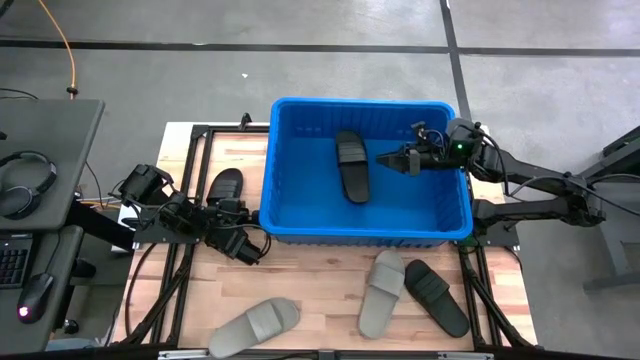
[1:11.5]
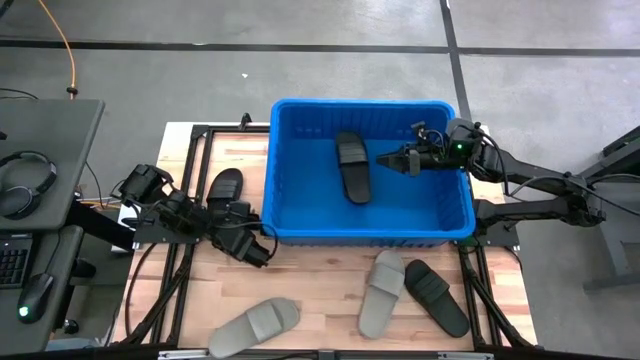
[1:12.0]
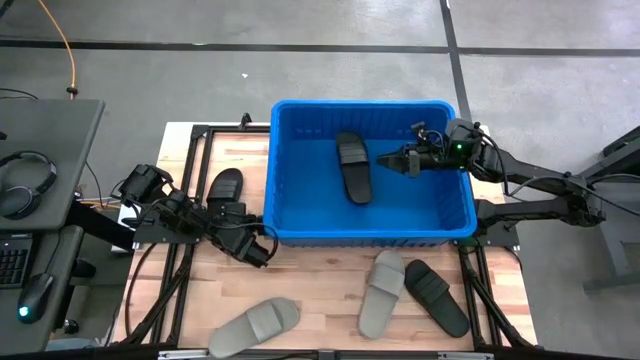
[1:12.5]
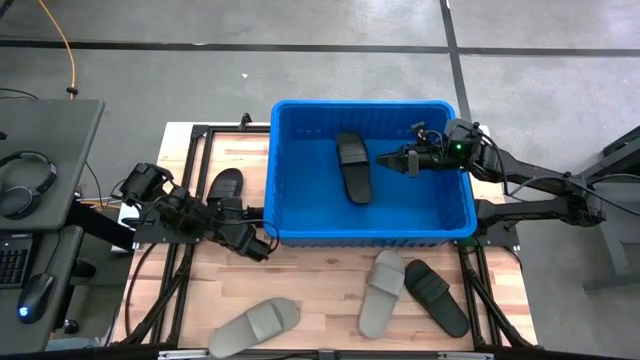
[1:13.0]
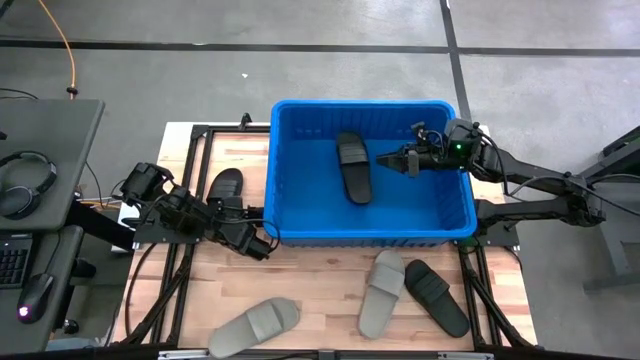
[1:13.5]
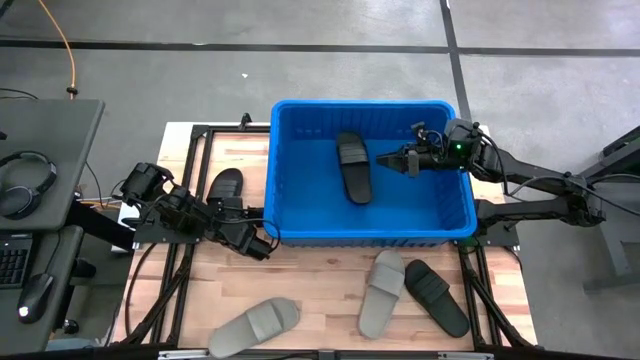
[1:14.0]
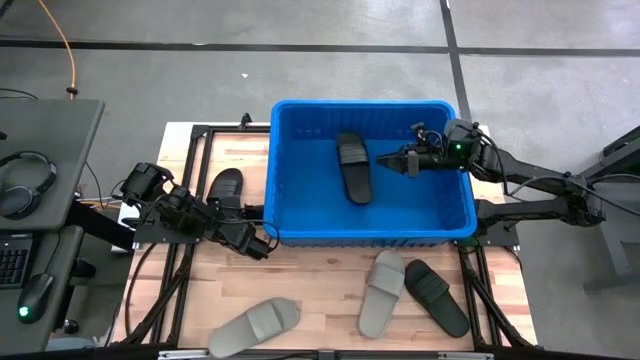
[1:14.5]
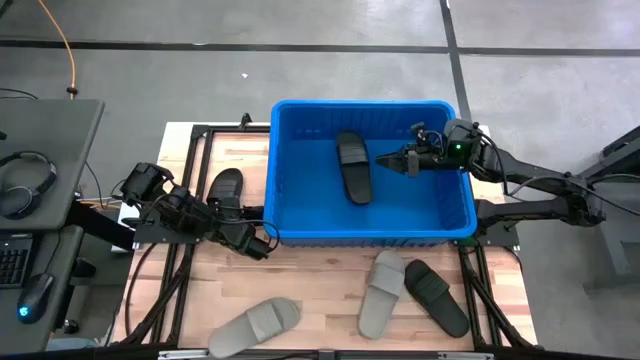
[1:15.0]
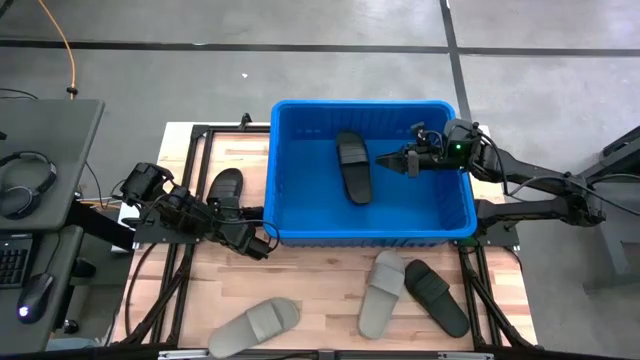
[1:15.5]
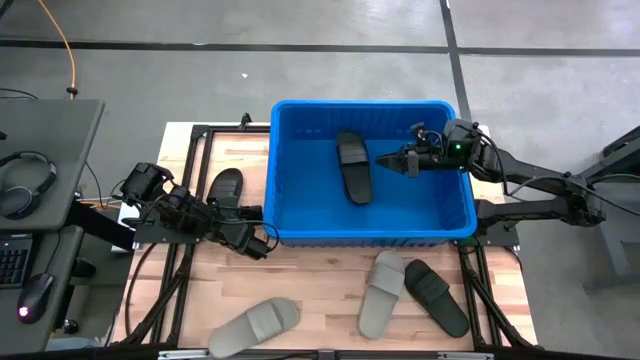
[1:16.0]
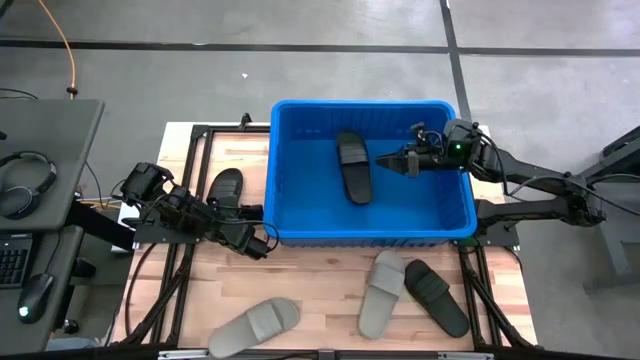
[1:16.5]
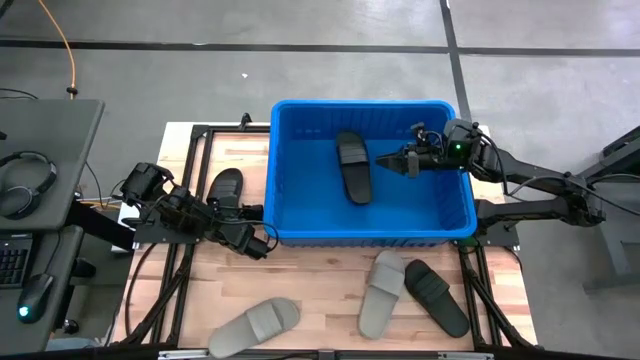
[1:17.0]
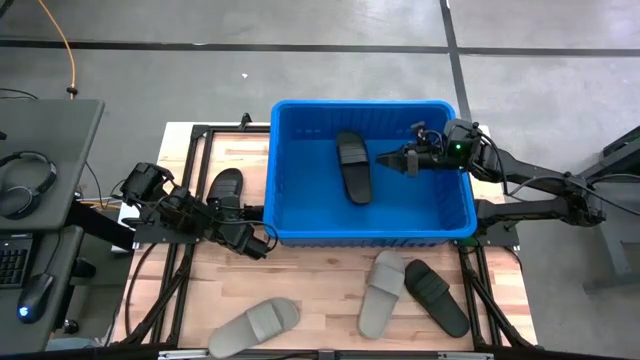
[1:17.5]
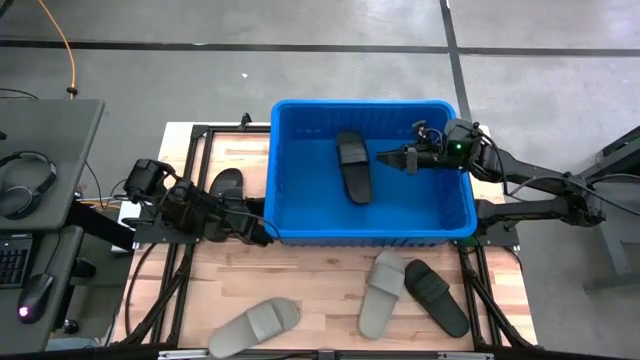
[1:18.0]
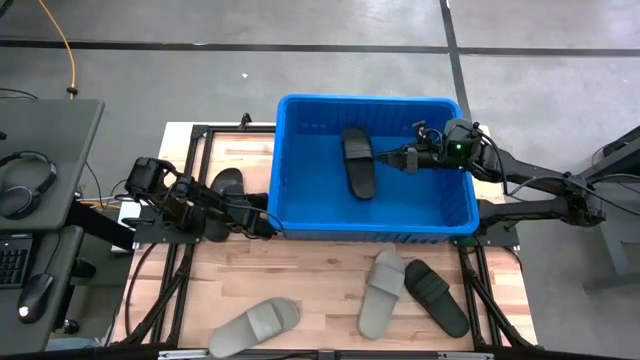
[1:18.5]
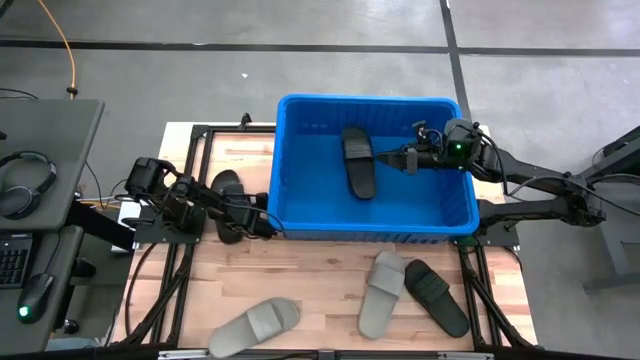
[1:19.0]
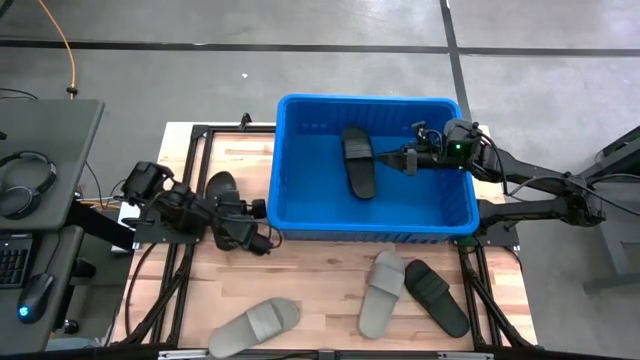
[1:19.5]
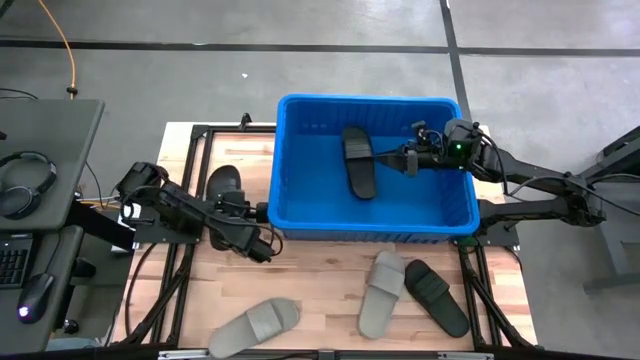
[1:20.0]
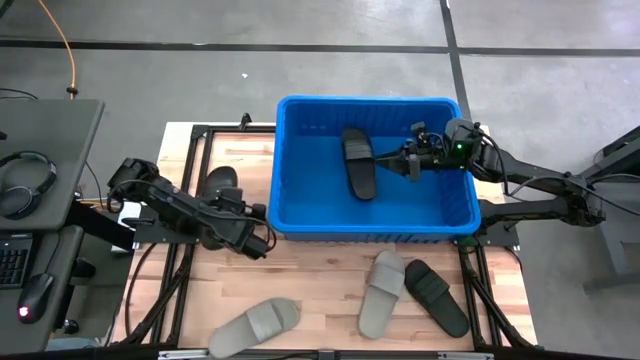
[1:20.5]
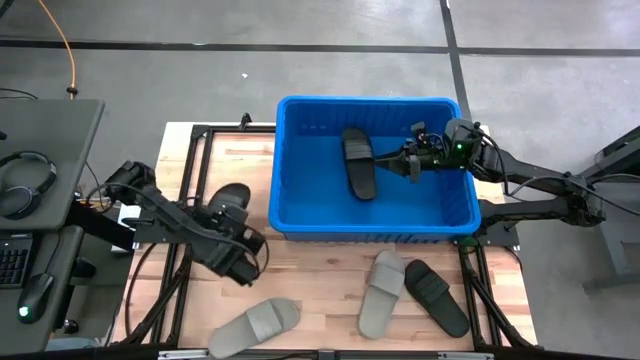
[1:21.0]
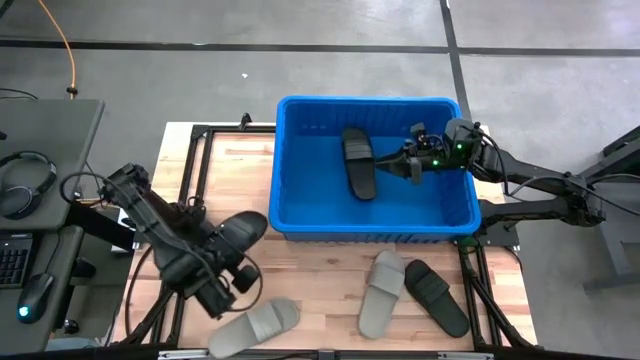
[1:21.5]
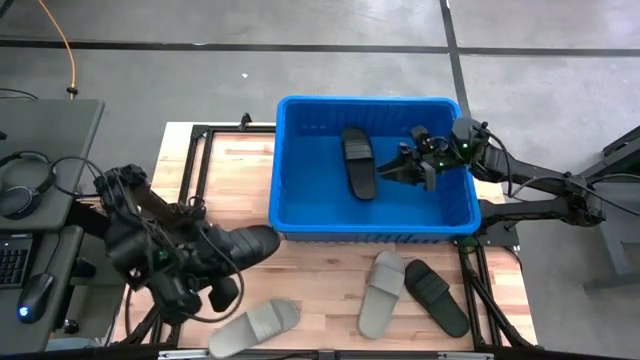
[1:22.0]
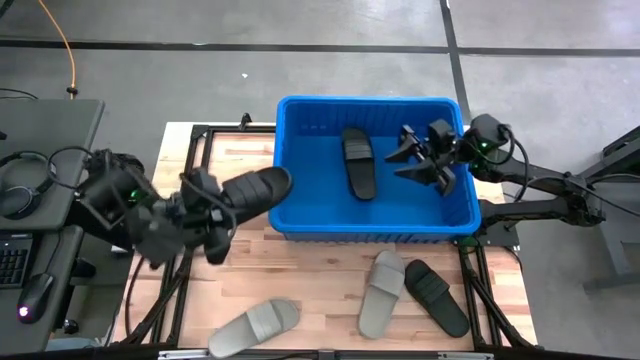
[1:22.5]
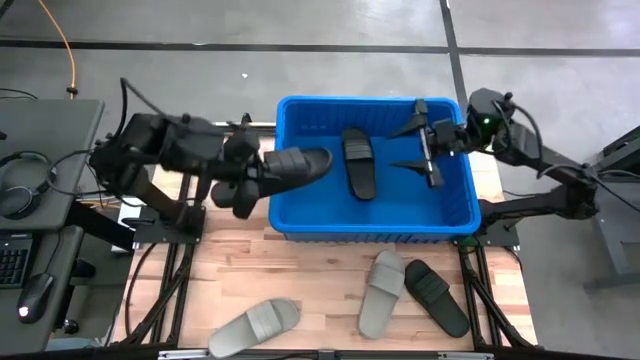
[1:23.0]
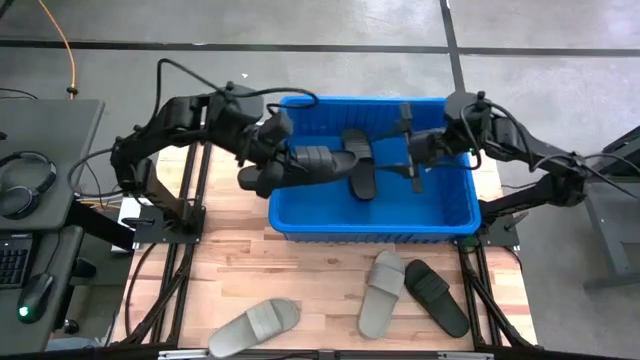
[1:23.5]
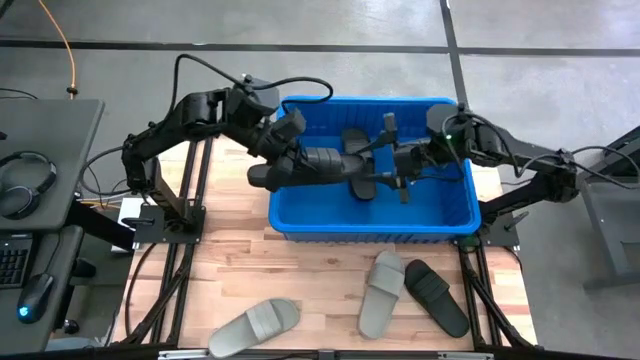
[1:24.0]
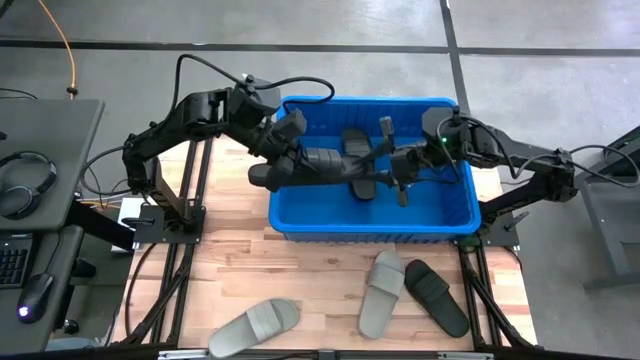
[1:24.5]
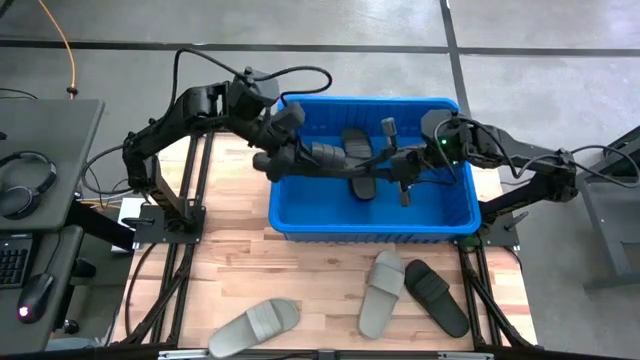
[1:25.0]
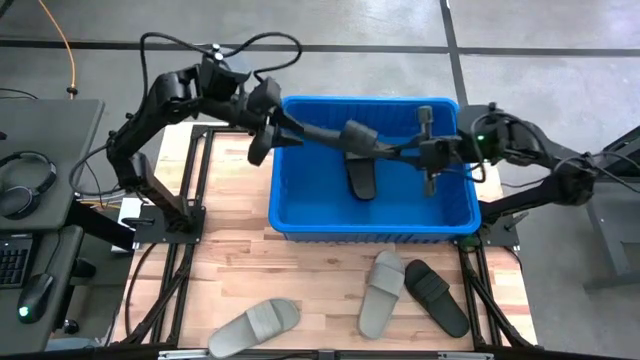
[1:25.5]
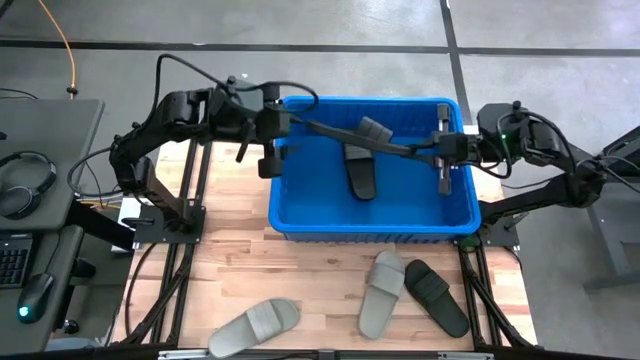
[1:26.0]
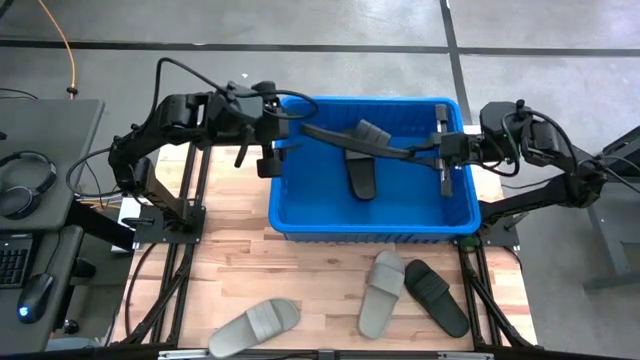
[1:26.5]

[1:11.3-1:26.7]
Task: Pick and place slides into bin
Put the black slides into the blue bin

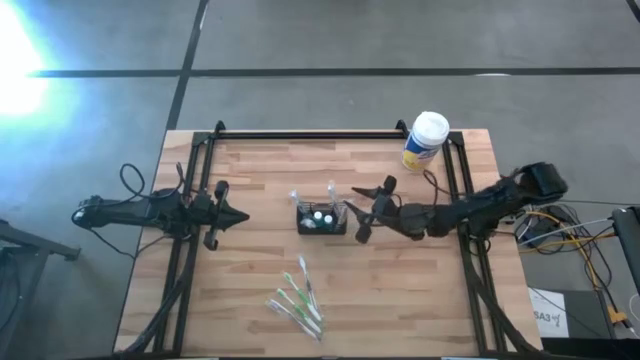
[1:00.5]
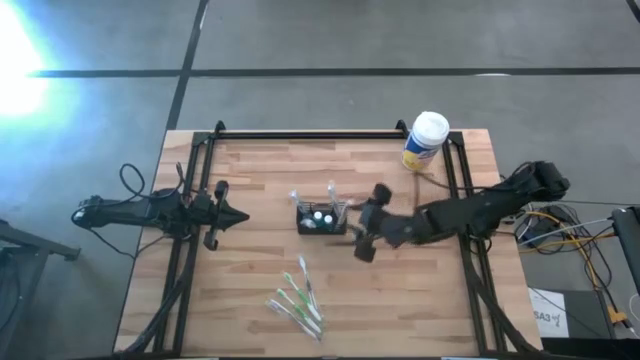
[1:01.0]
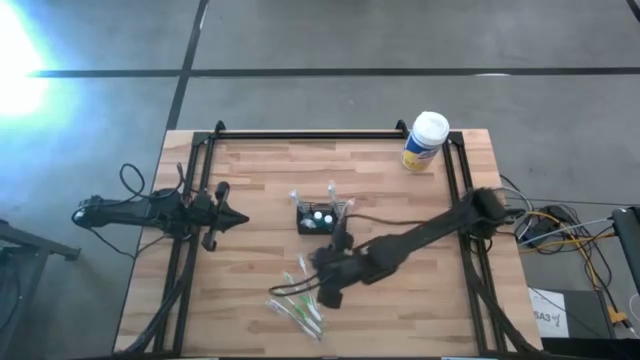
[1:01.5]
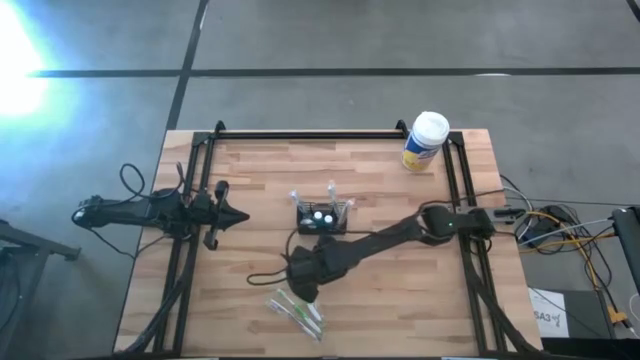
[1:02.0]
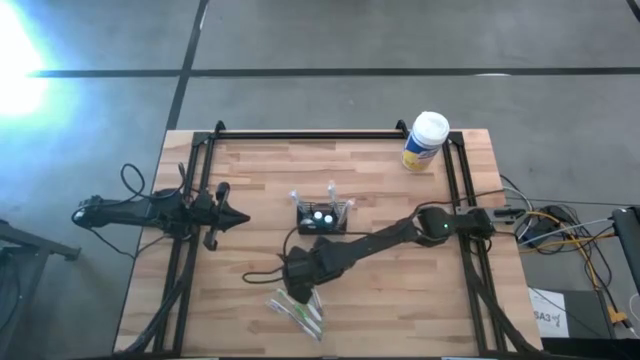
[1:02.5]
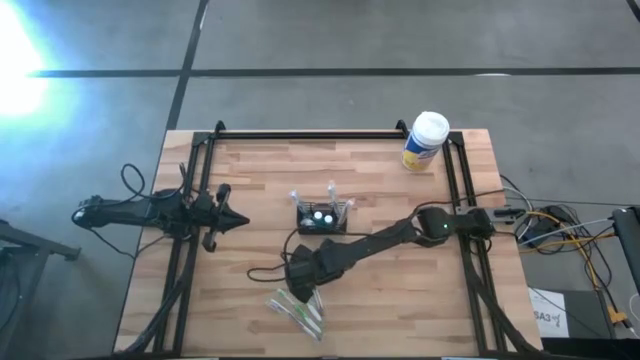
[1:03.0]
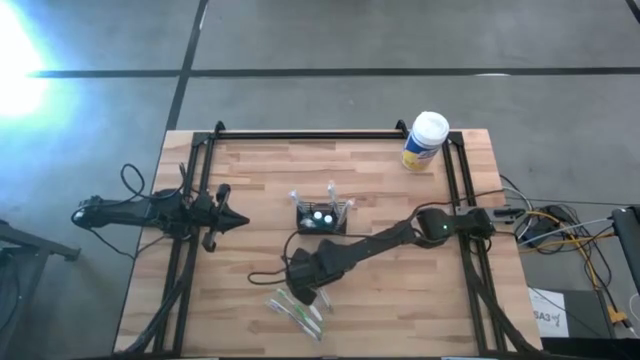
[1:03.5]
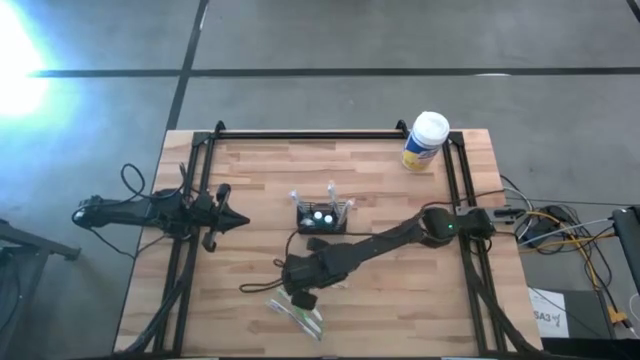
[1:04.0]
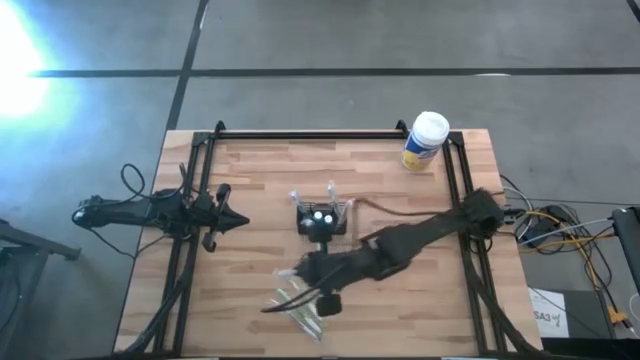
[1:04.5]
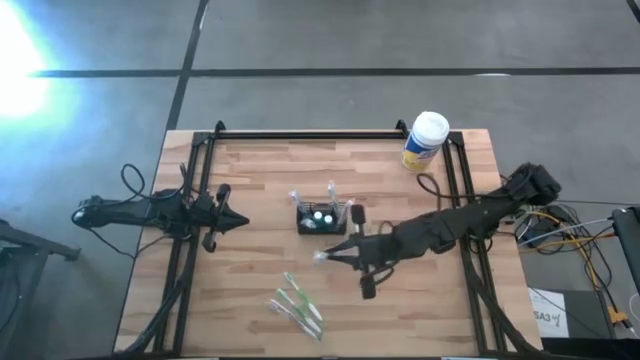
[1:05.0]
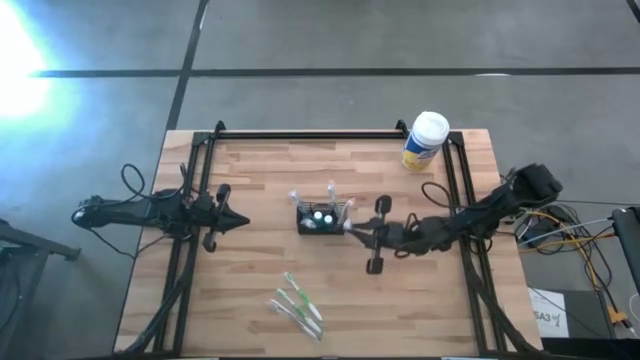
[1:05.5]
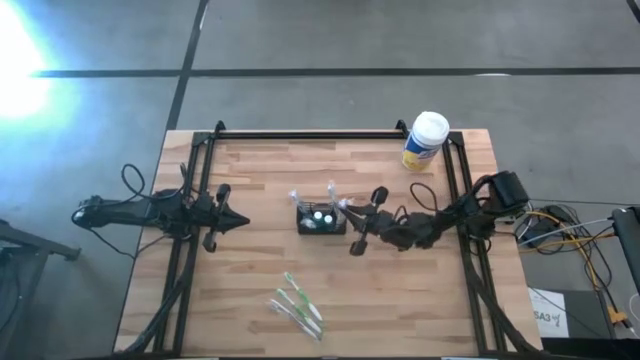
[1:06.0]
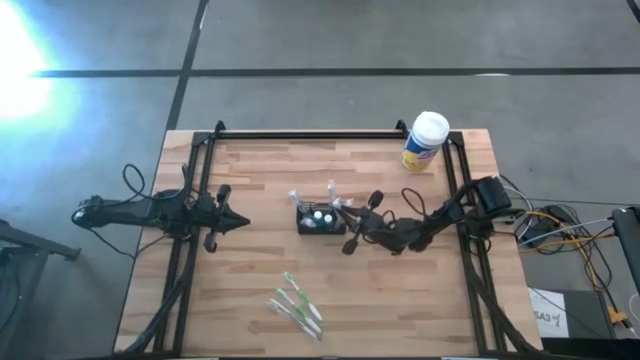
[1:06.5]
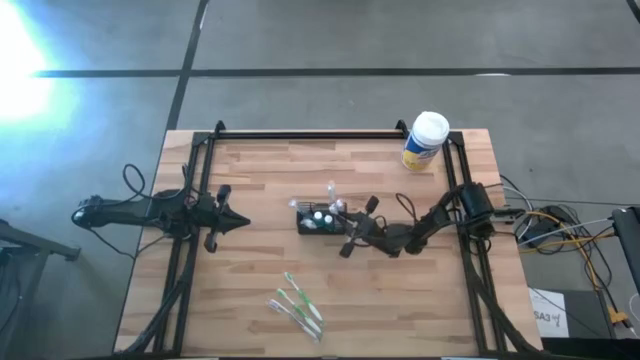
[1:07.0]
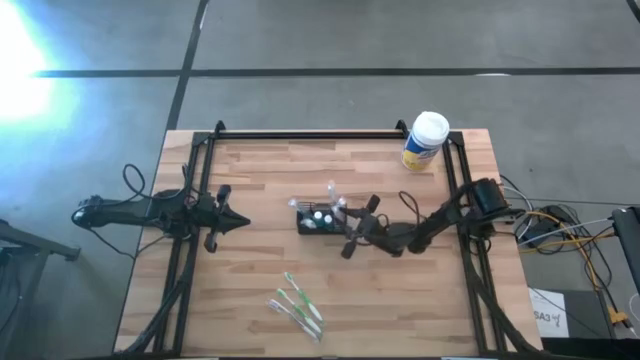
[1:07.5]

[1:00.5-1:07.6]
Task: Pick & Place toothbrushing station
Put the top purple toothbrush into the black mesh organizer
